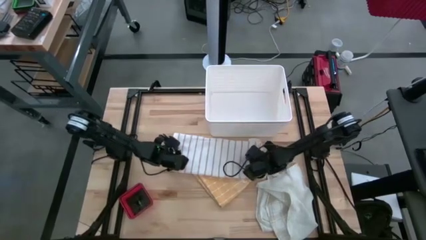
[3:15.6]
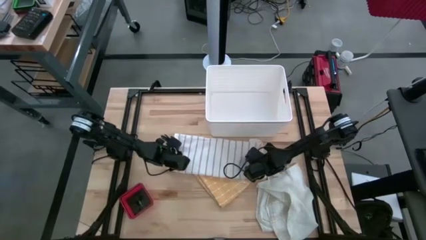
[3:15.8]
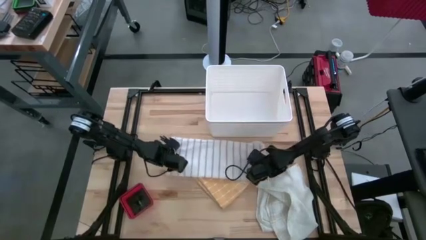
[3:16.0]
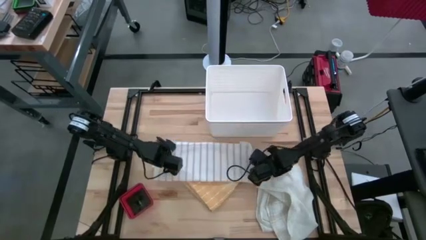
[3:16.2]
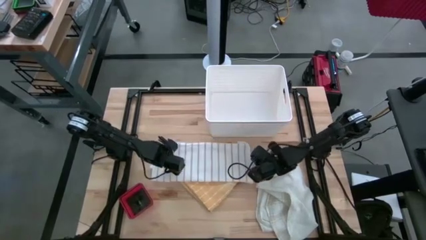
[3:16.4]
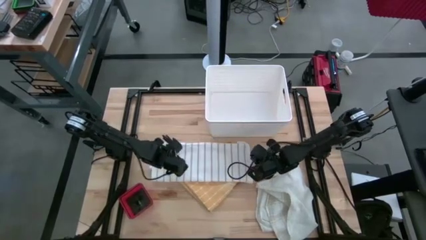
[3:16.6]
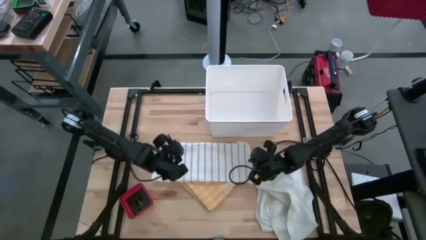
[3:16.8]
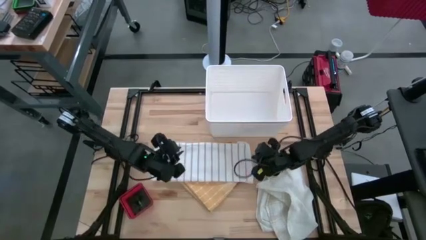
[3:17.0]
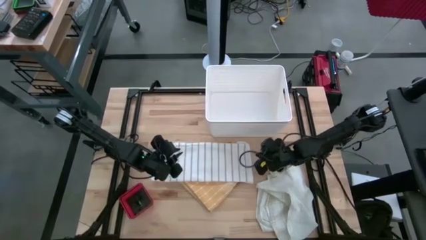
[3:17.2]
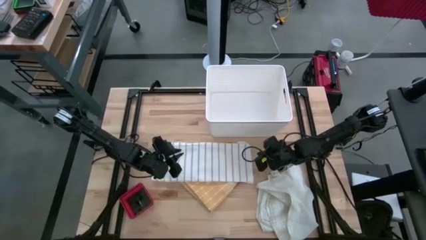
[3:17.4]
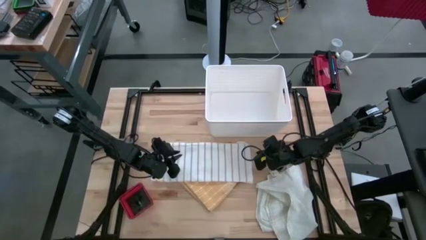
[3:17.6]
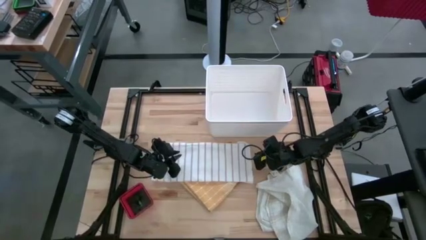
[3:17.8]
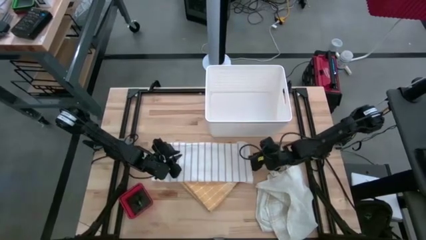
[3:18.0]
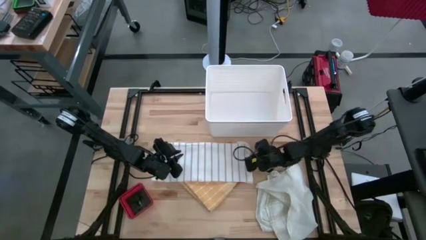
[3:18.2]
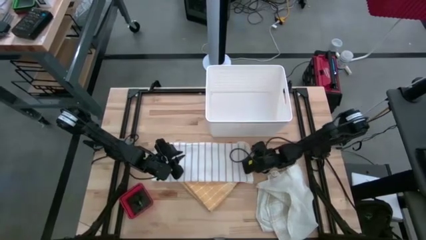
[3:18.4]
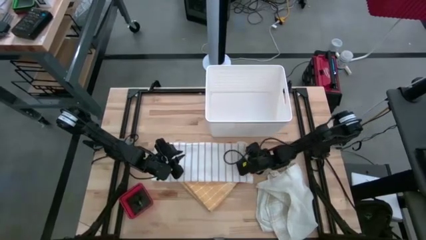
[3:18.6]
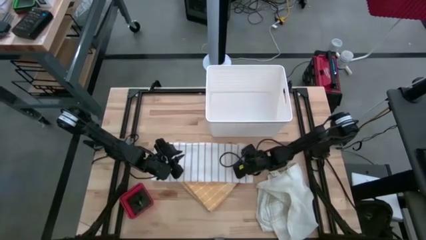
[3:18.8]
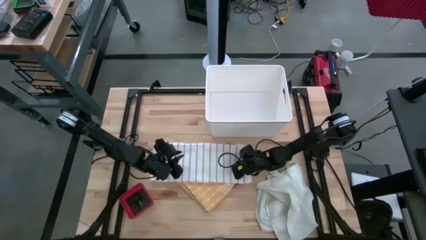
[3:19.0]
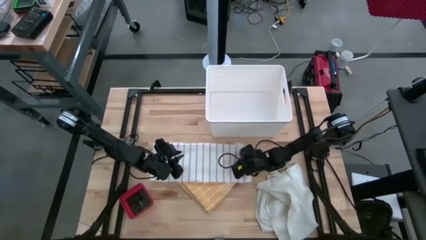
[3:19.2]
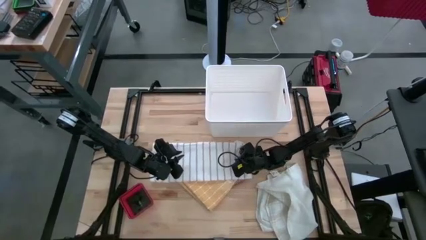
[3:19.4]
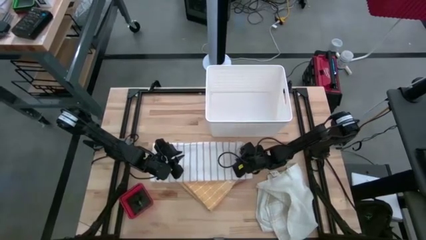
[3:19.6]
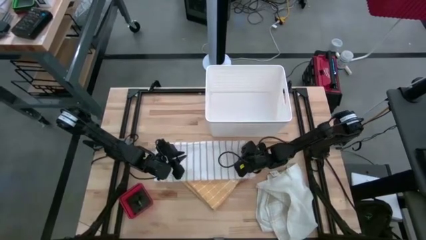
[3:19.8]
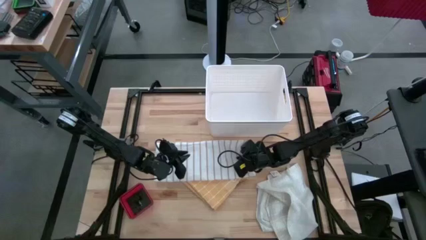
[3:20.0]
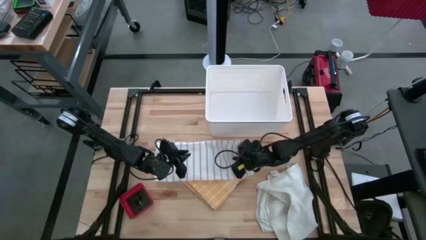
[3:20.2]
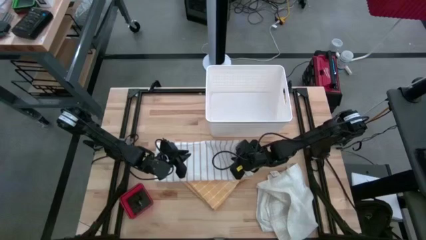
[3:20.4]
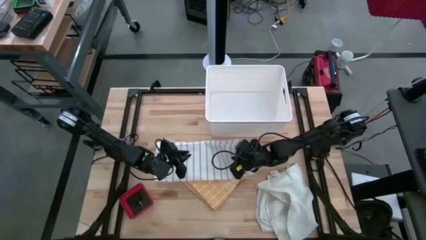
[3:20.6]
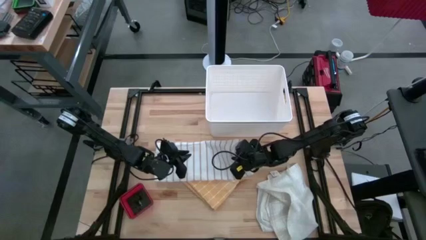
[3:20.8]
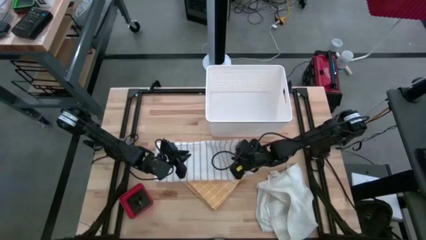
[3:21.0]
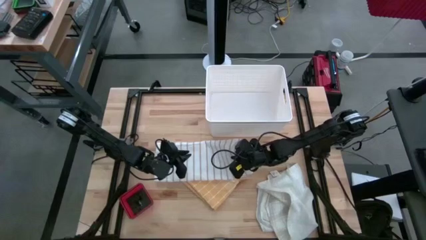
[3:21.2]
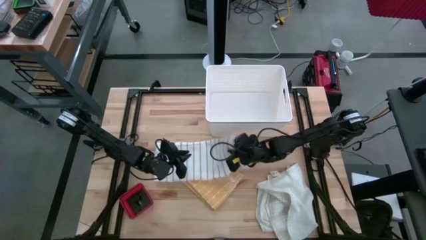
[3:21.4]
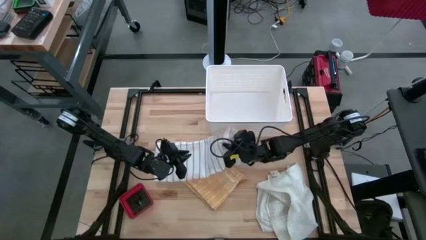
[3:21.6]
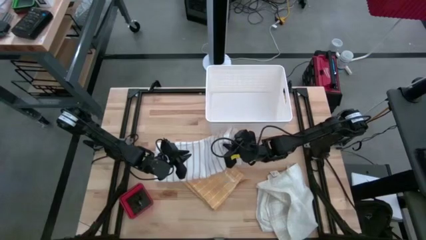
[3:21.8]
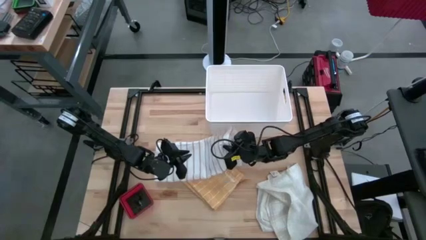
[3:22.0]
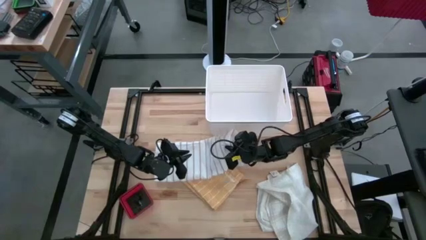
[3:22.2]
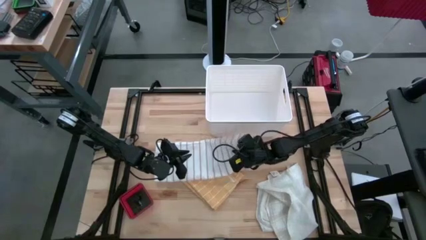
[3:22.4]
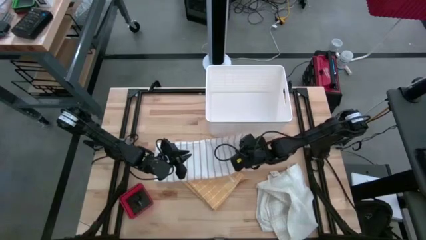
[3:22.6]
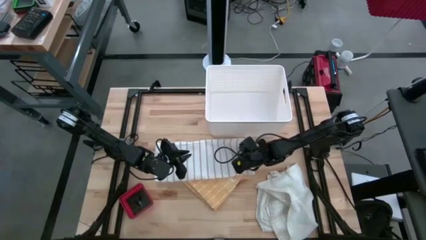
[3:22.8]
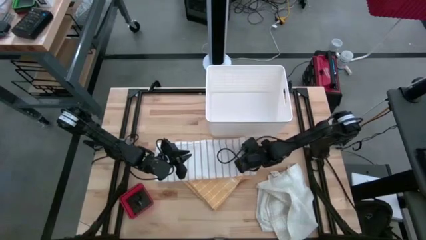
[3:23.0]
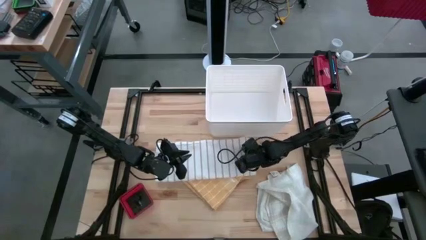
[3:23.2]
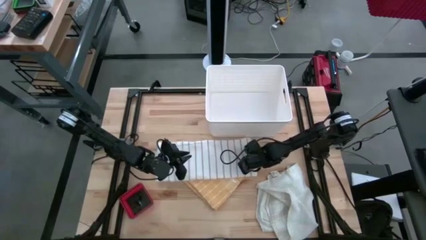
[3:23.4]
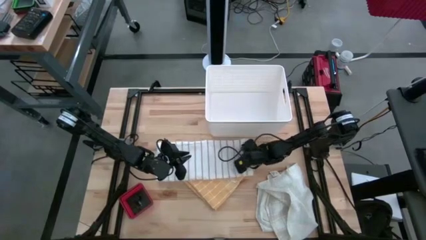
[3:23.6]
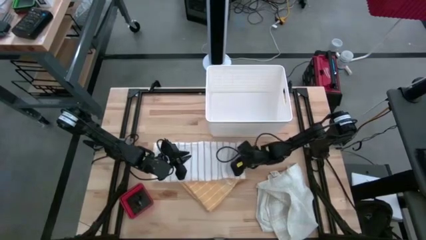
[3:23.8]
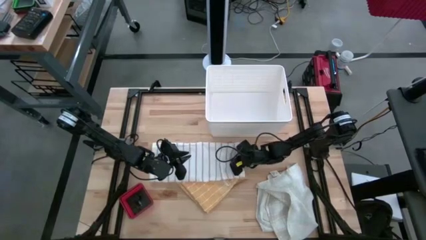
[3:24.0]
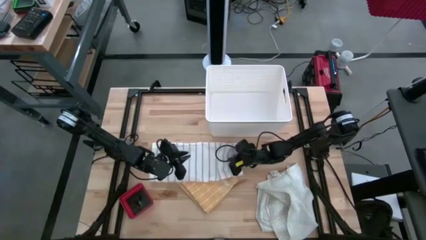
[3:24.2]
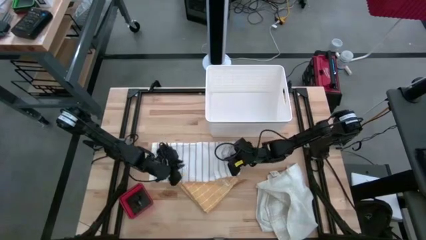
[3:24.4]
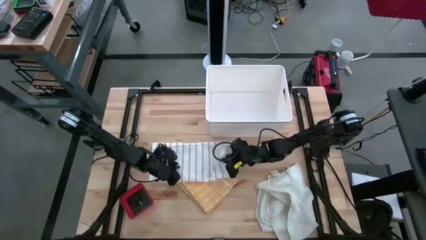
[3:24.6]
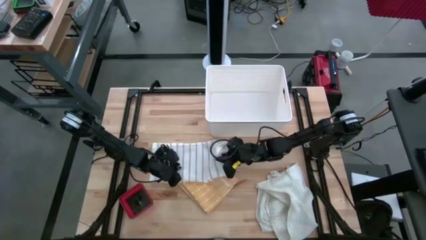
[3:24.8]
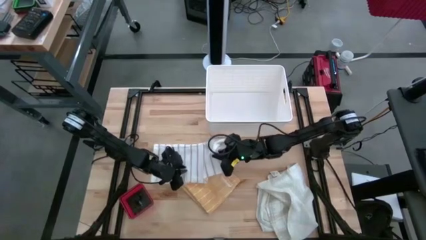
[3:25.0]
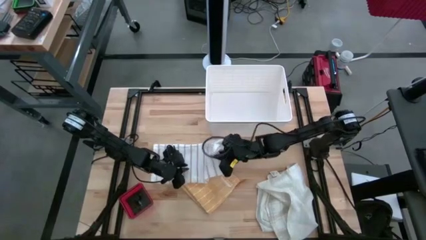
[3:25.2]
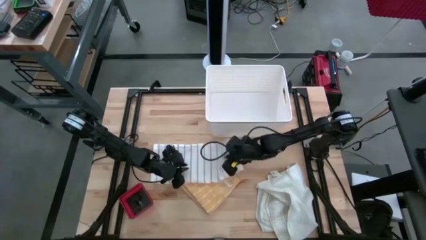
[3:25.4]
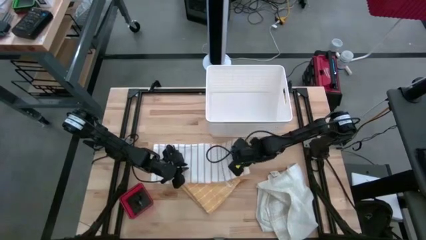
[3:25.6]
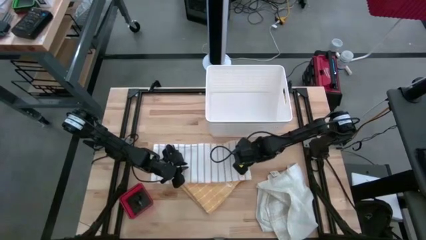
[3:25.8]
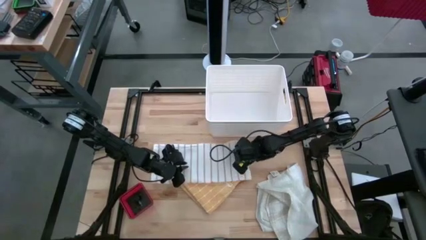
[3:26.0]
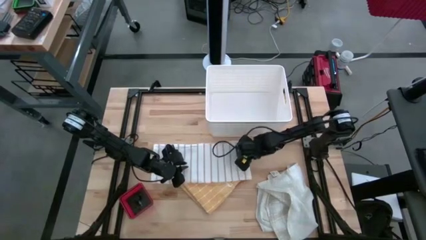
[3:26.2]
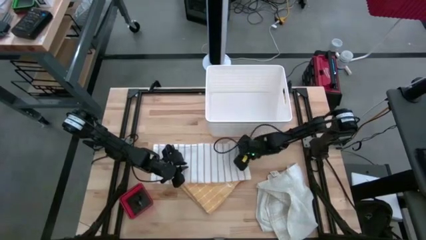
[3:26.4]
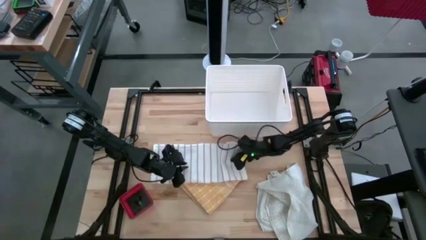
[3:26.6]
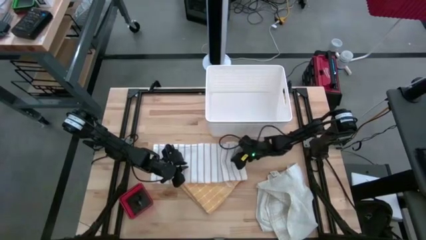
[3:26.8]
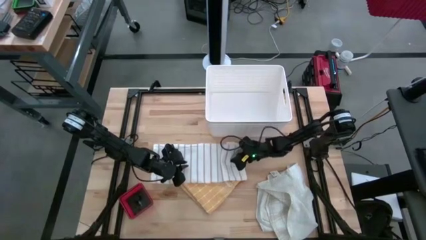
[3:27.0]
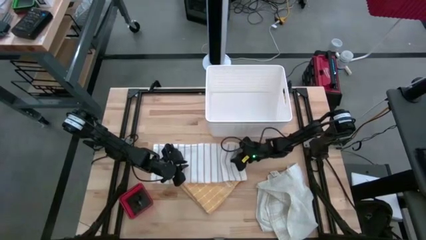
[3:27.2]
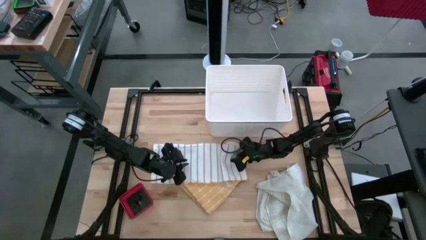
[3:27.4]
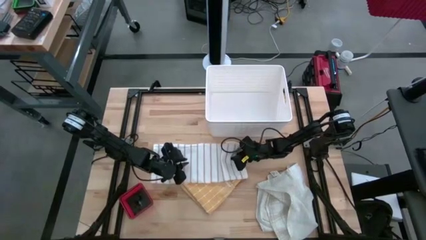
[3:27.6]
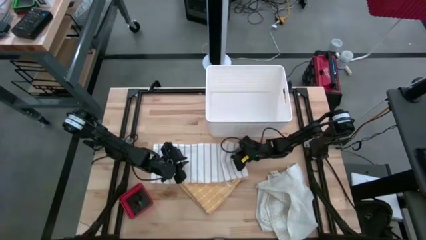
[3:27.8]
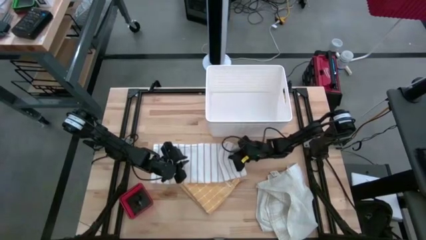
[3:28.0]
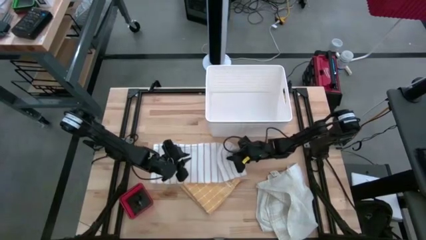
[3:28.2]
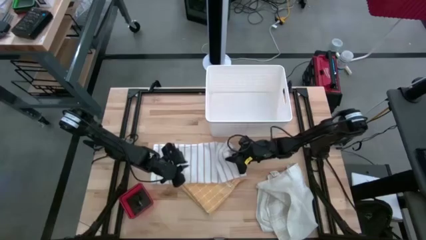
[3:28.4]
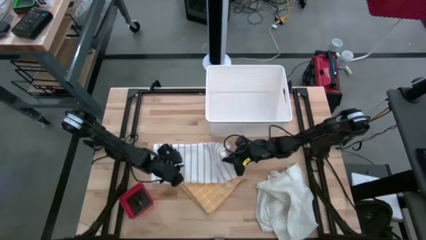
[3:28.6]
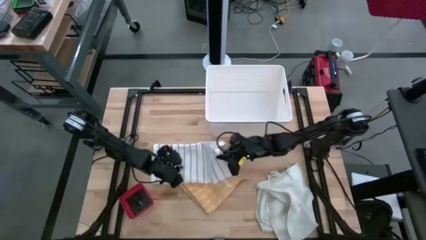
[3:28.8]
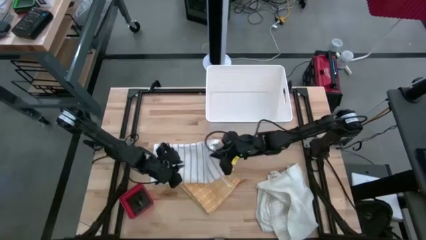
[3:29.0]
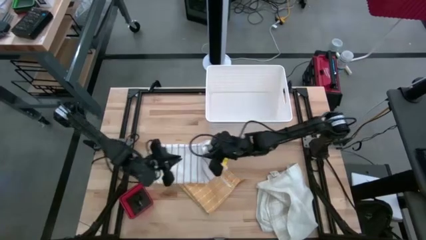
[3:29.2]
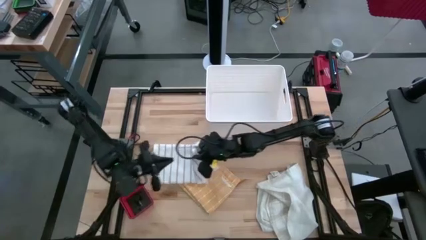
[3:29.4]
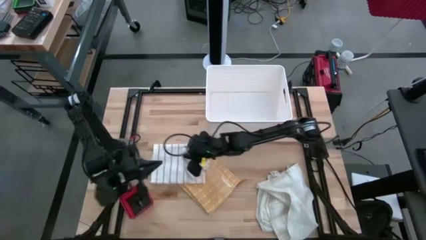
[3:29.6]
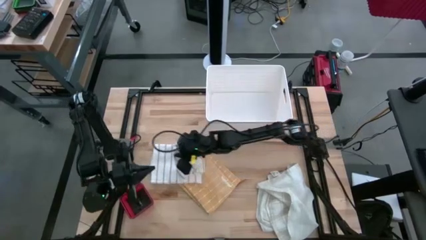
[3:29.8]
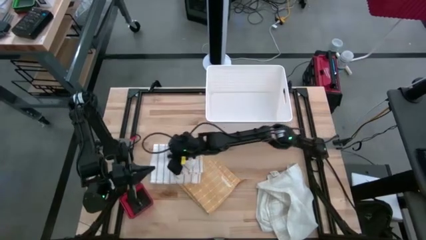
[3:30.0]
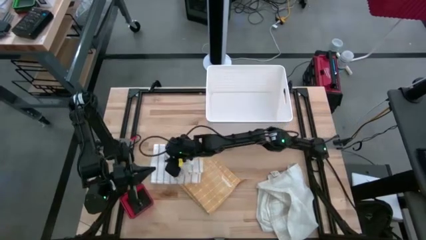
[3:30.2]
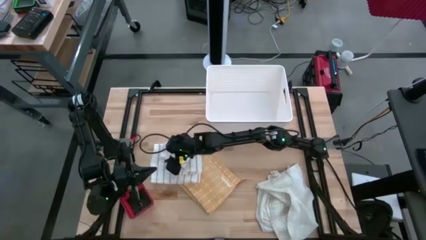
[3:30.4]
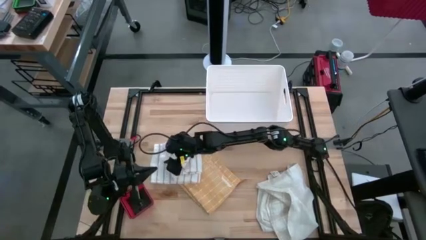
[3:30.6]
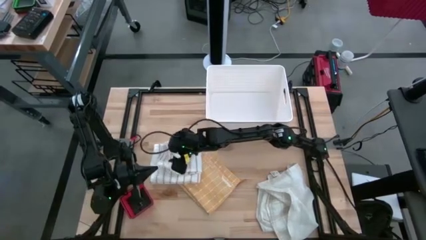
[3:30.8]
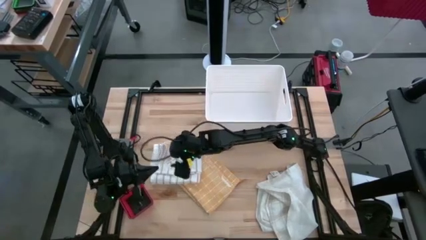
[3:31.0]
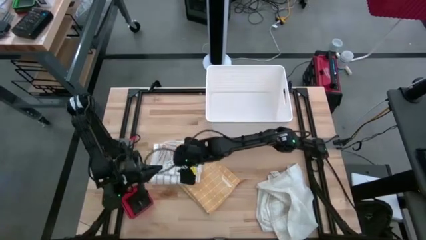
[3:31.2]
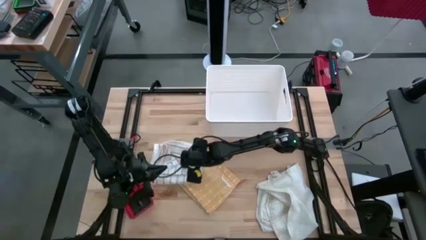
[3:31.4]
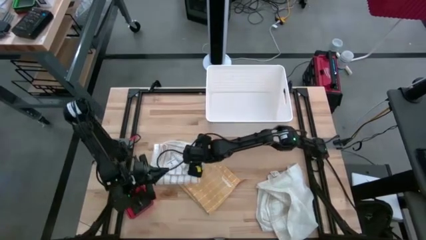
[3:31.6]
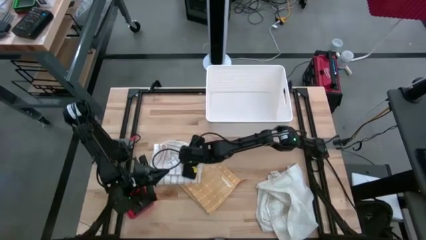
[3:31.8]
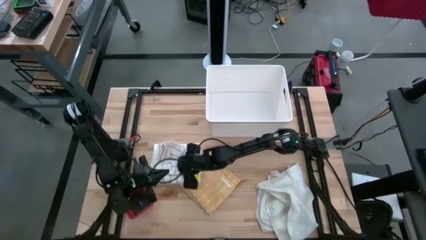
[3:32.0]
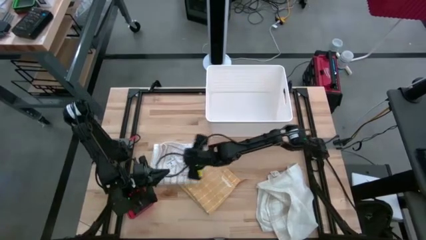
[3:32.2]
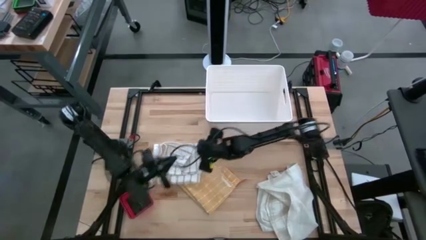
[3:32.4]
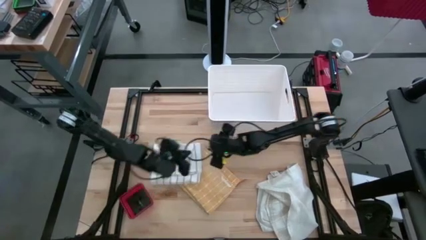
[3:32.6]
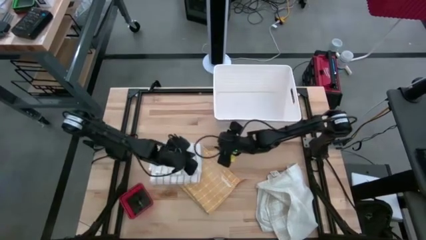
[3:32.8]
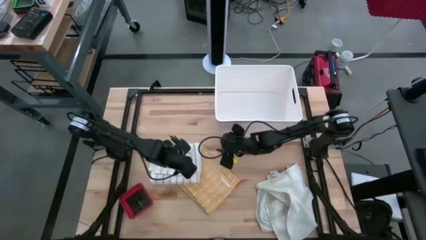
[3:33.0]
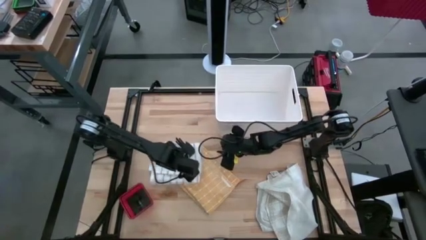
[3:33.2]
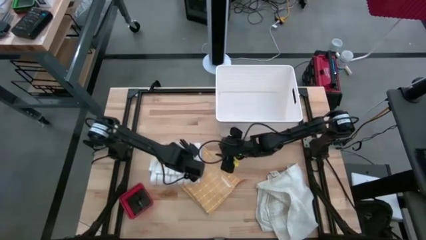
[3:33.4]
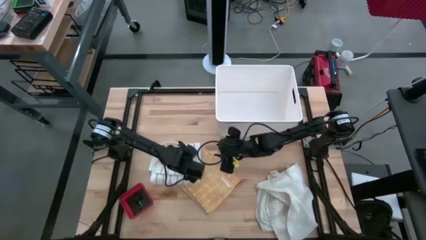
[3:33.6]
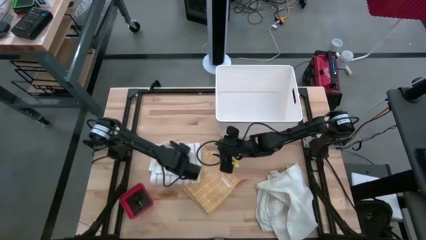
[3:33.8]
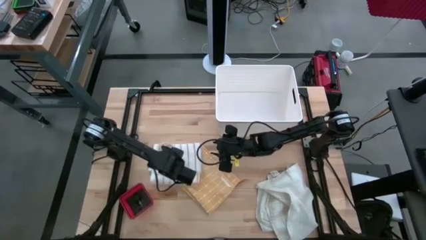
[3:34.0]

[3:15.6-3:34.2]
Task: Fold towel
Fold the brown patterned towel
